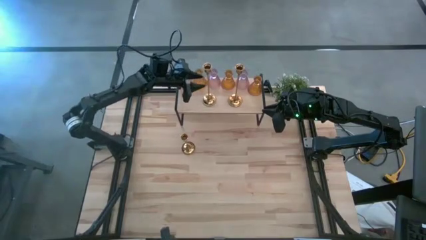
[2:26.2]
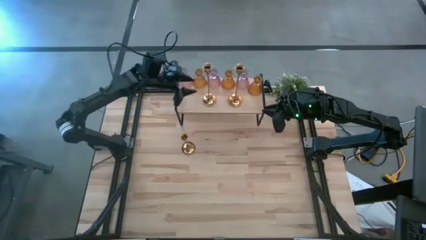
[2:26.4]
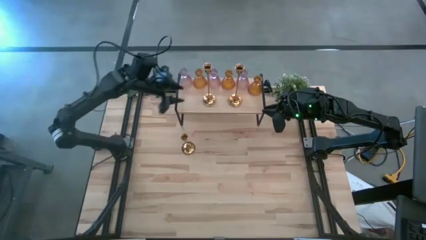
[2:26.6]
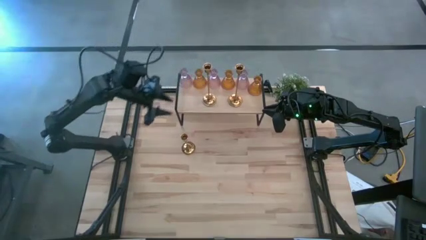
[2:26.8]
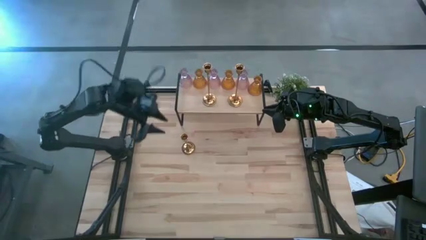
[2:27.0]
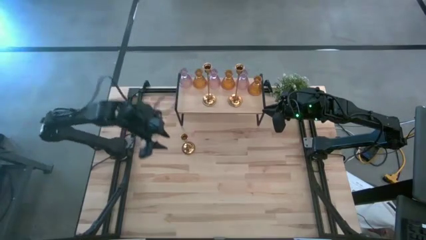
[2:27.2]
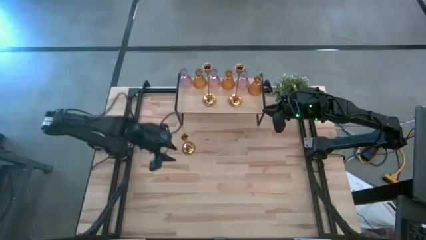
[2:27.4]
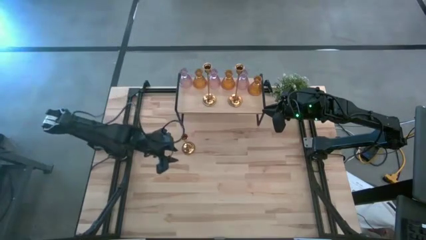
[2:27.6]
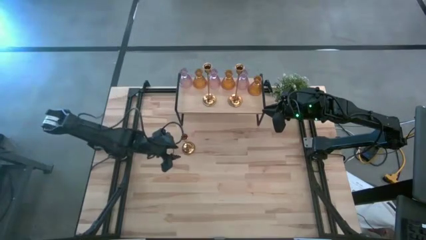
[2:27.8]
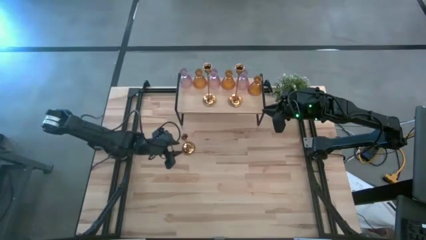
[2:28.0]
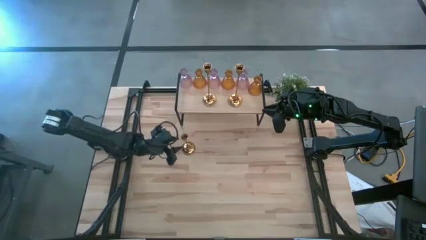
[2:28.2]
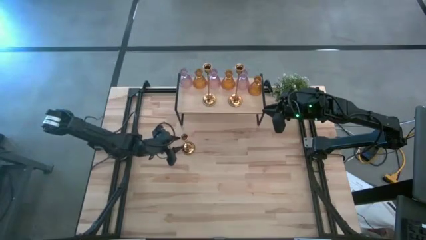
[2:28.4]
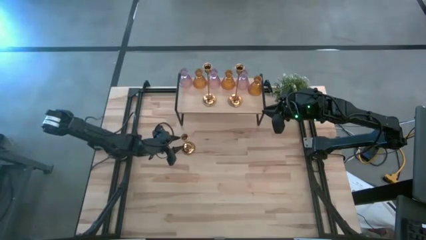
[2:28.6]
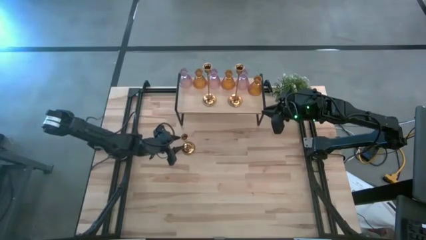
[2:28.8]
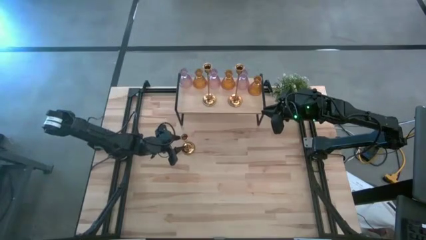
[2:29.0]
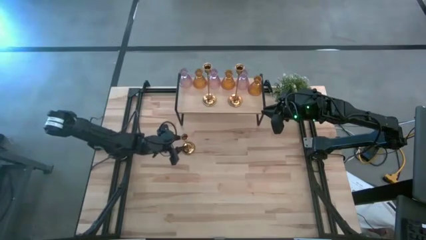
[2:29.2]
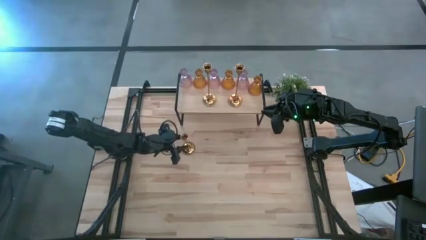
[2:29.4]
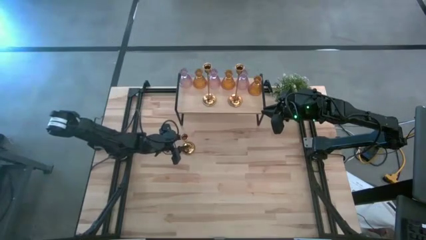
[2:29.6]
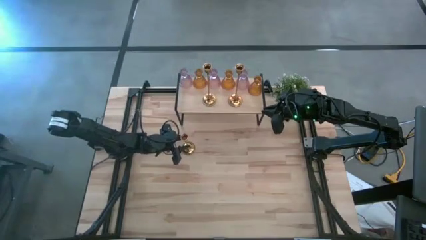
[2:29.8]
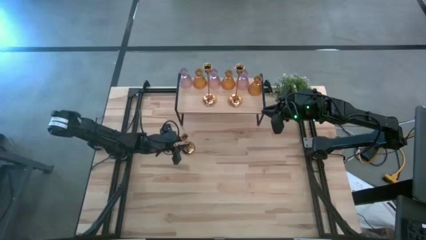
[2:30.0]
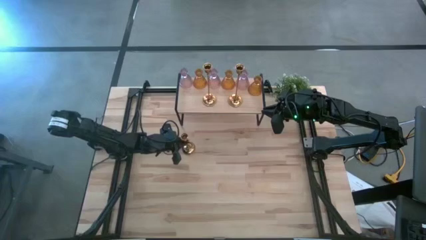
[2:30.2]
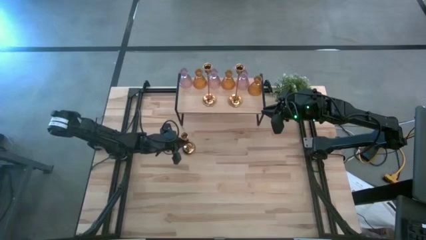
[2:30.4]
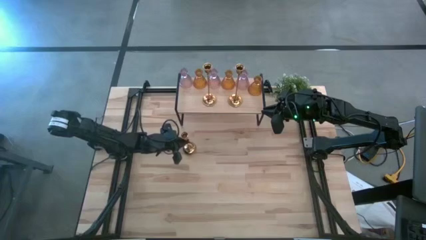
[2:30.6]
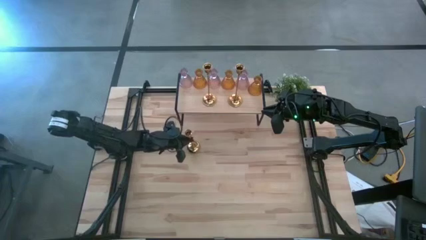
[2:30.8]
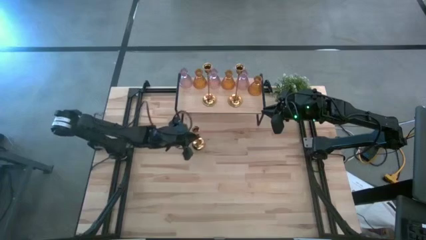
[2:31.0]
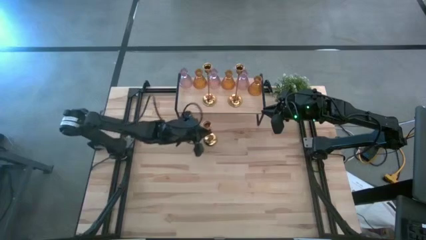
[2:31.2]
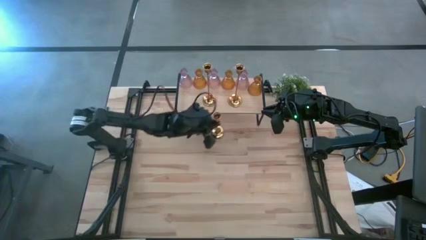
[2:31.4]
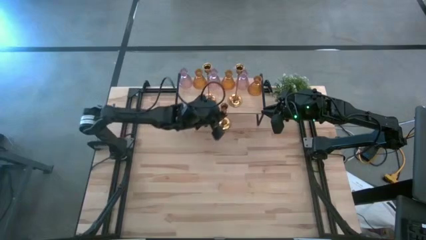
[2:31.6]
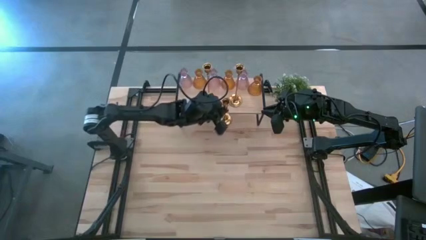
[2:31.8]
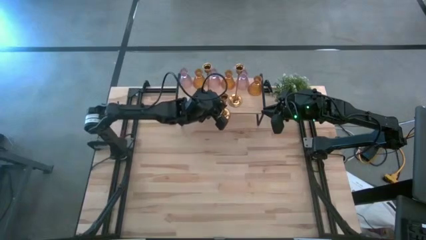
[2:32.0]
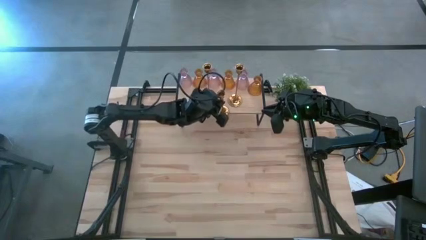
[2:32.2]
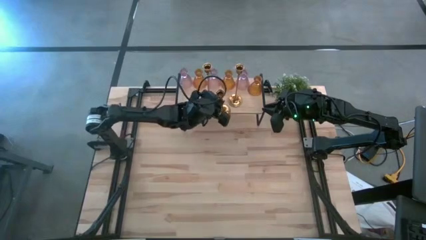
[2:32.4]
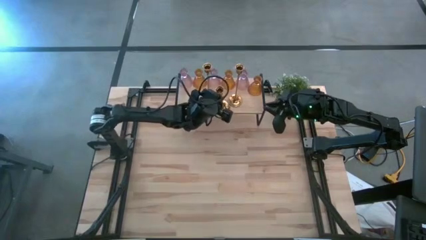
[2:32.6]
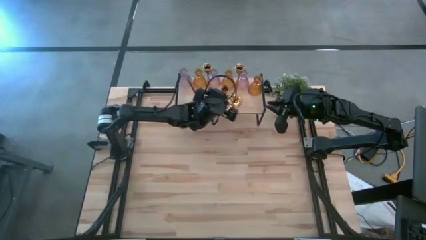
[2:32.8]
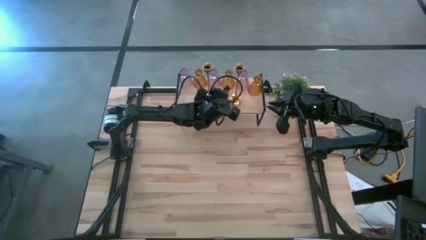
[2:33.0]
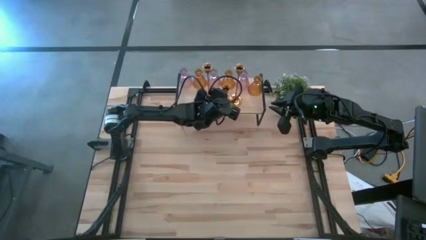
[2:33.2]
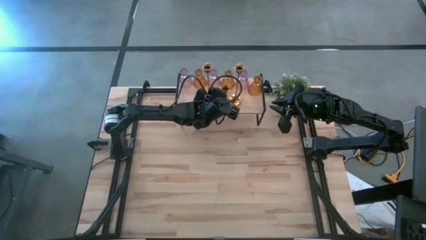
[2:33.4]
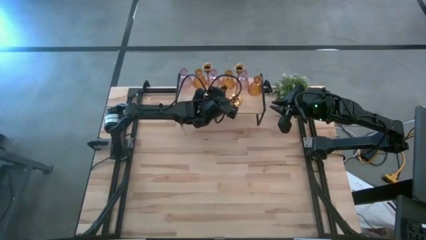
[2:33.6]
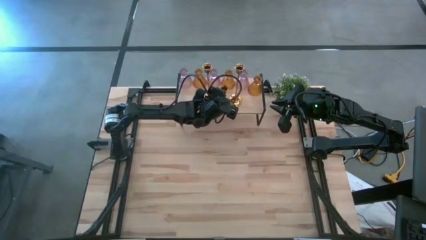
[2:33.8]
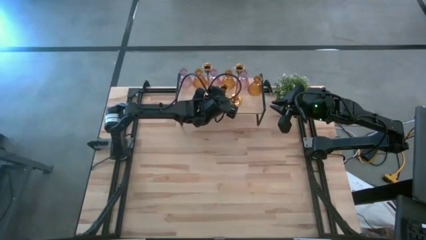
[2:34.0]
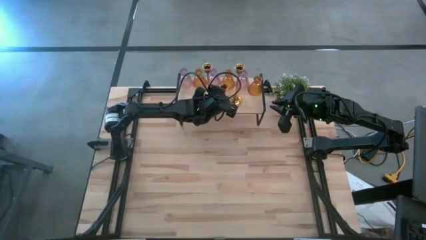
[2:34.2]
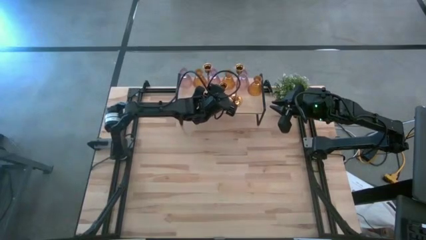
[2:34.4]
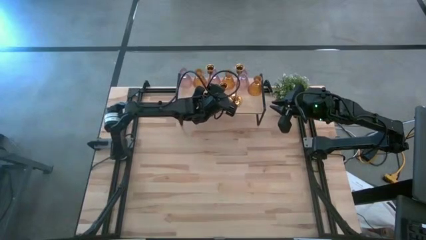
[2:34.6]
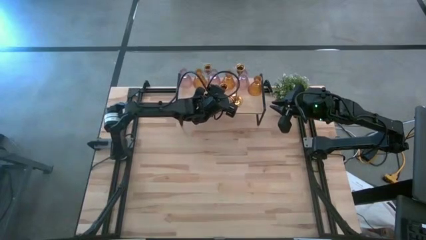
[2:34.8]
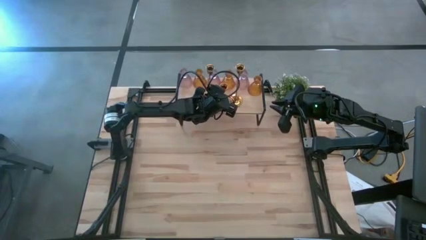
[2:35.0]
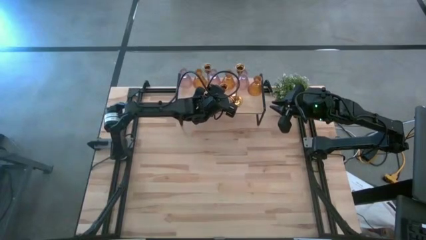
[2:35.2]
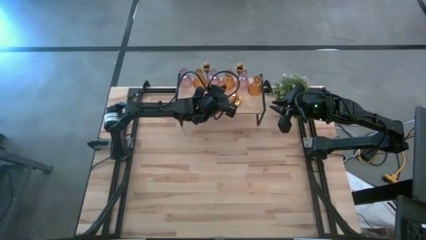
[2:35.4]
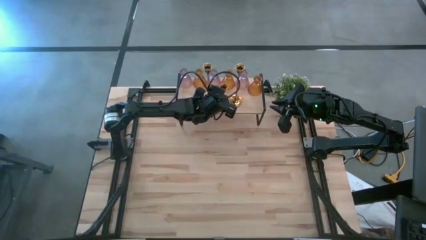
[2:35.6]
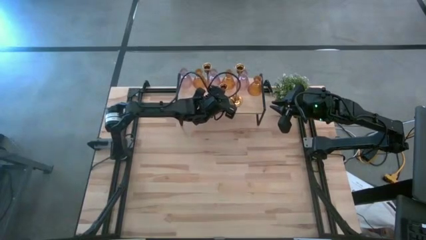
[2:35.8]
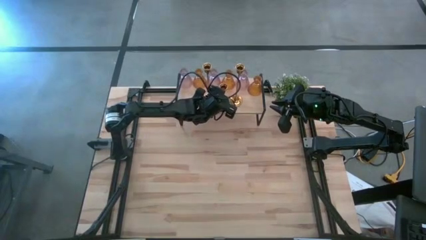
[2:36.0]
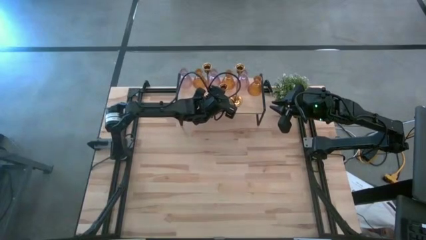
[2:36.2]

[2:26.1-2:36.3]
Task: Pick & Place candle stick holders
Put the gold candle holder on the shelf

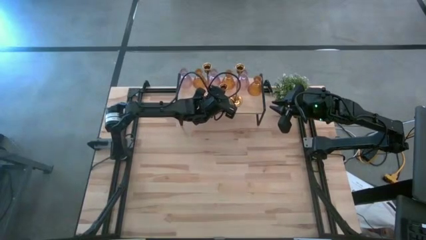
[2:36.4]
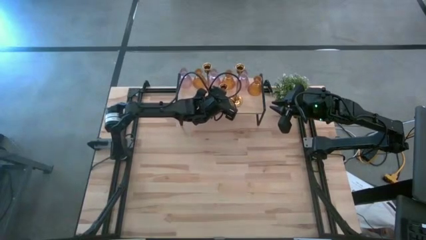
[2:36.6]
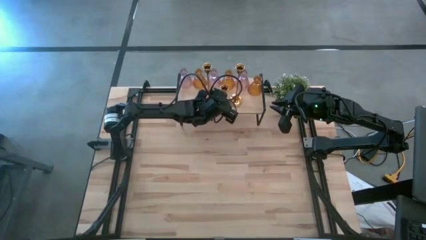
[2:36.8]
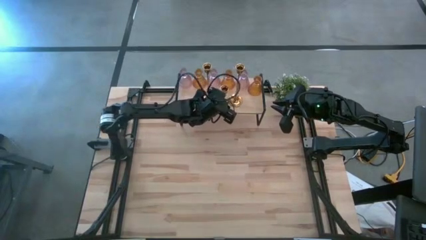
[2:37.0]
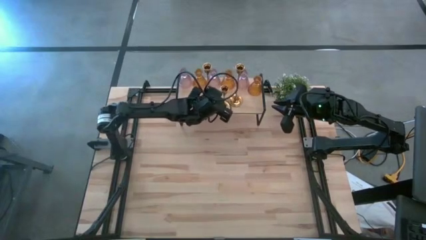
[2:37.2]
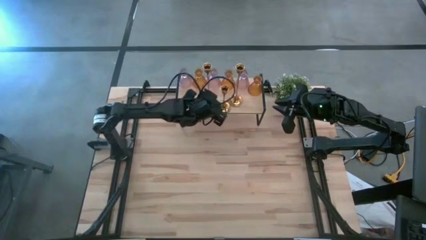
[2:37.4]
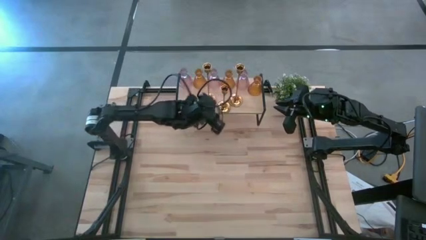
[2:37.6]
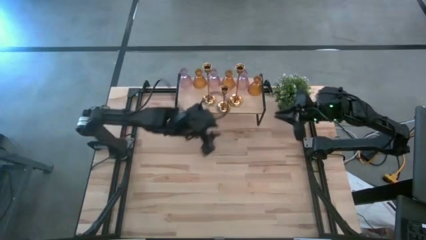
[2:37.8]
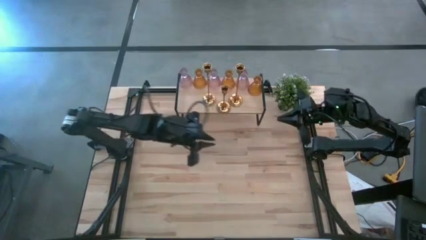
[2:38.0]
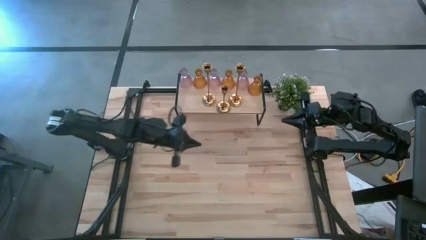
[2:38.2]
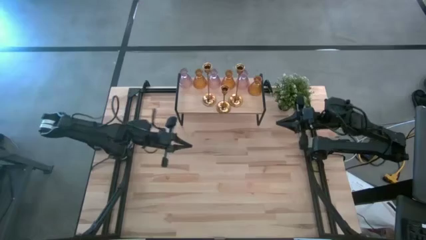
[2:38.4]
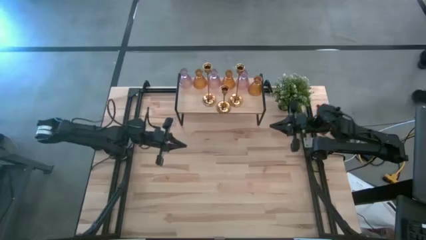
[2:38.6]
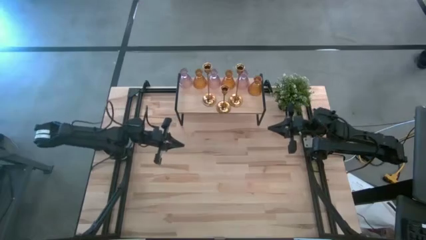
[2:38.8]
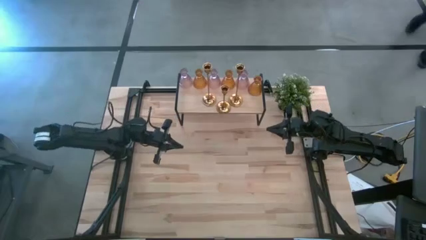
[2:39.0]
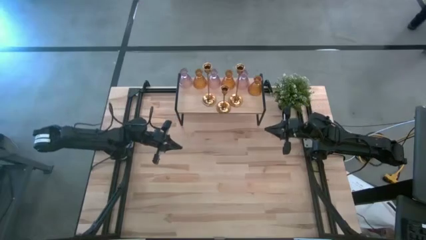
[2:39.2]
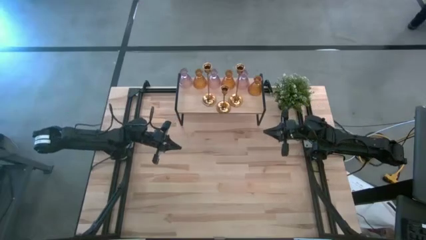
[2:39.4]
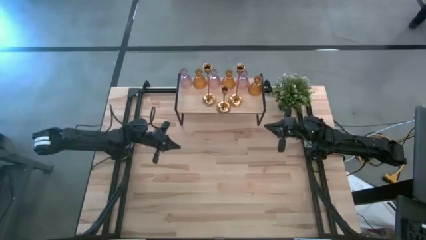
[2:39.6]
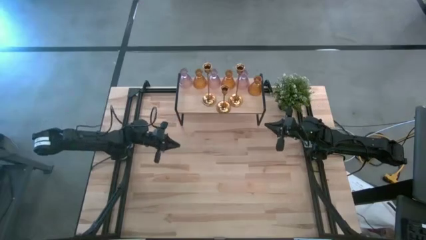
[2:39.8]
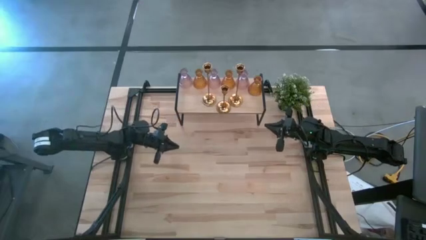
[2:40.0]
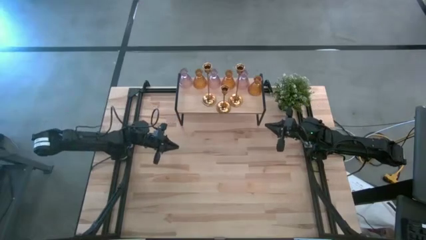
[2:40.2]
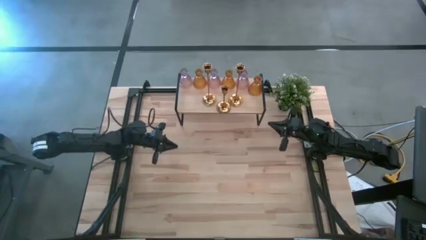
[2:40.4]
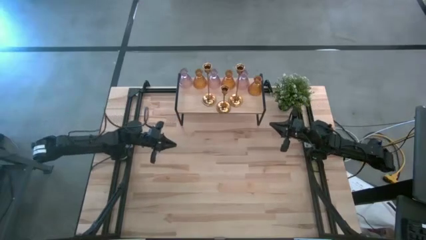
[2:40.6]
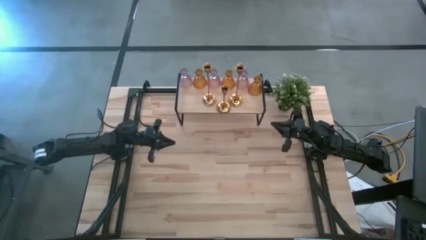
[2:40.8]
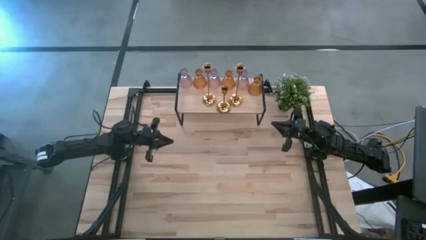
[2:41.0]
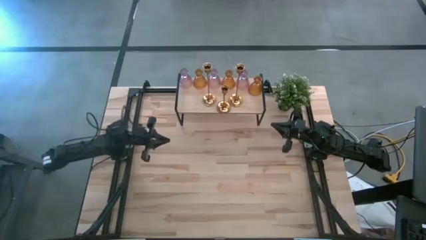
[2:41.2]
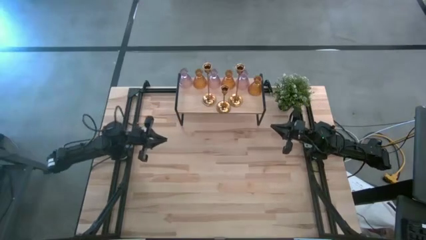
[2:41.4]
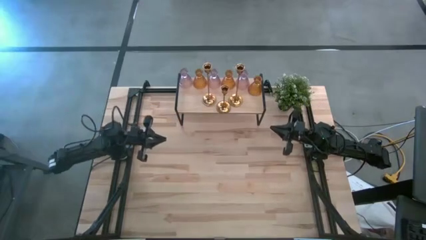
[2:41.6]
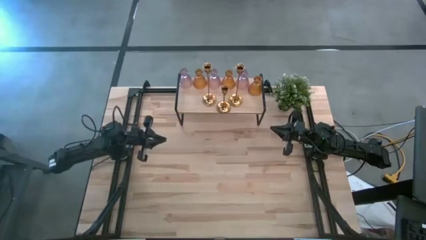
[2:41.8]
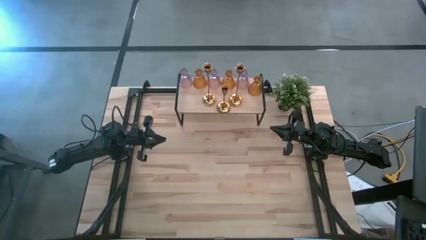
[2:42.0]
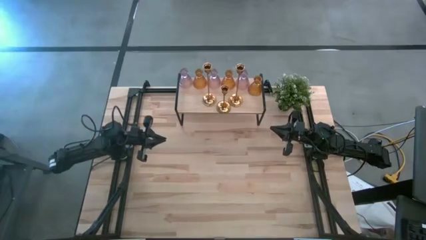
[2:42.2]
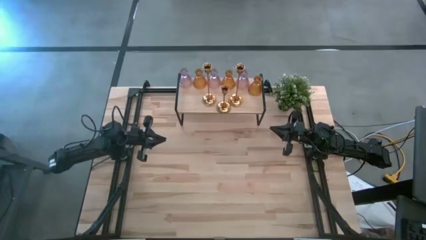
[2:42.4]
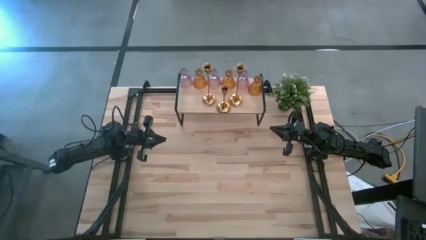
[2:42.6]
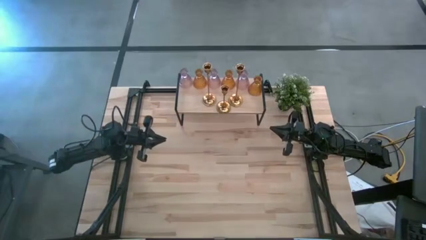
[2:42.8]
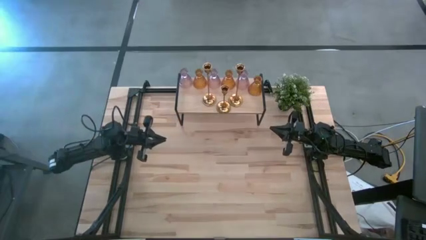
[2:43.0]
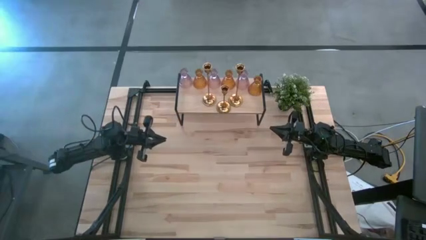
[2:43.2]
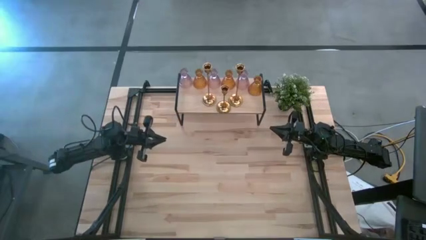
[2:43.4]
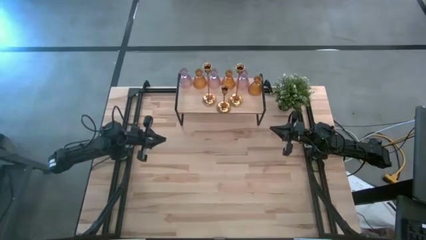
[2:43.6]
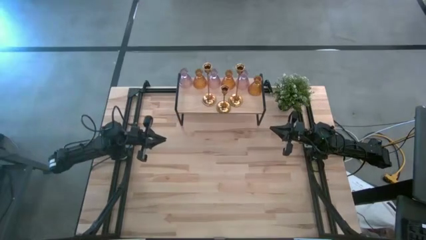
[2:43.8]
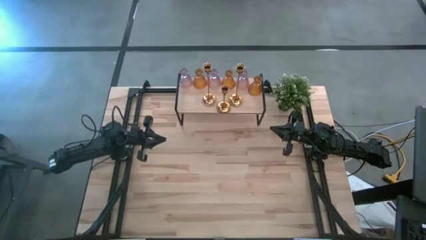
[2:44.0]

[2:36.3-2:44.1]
Return to Home Position
